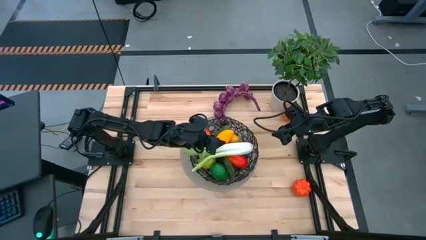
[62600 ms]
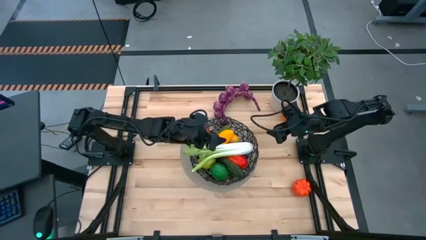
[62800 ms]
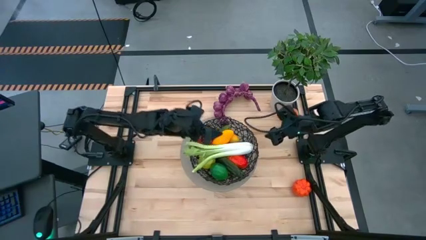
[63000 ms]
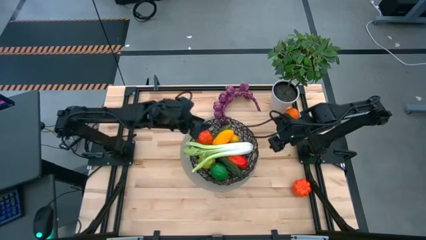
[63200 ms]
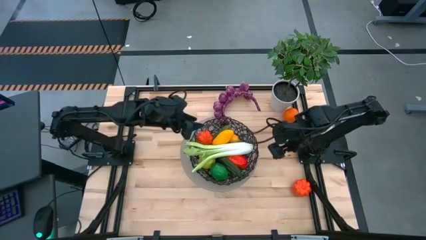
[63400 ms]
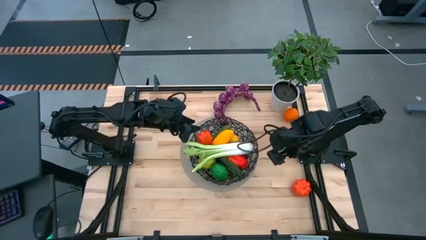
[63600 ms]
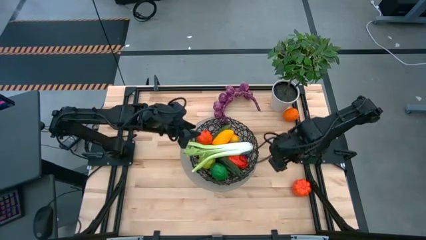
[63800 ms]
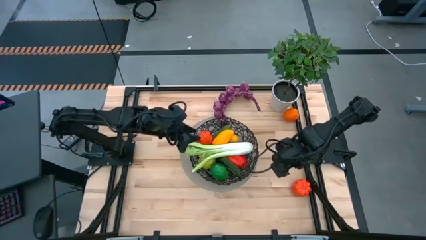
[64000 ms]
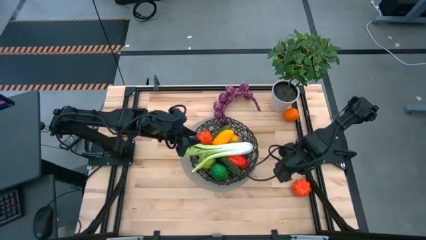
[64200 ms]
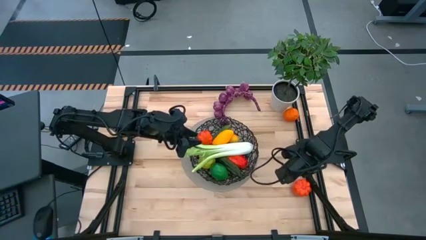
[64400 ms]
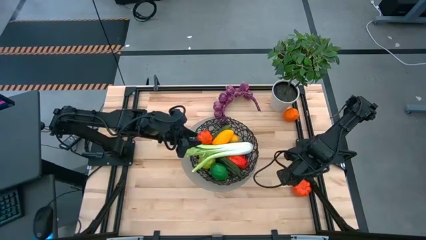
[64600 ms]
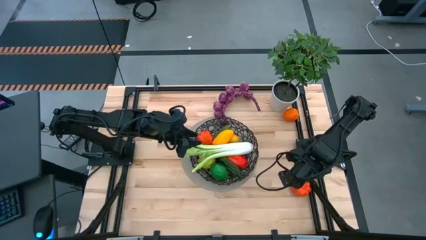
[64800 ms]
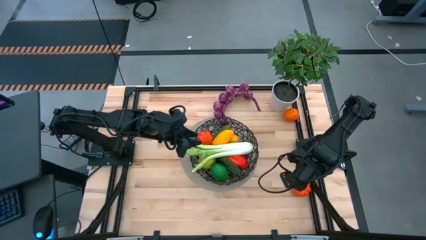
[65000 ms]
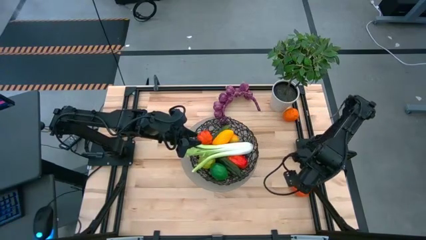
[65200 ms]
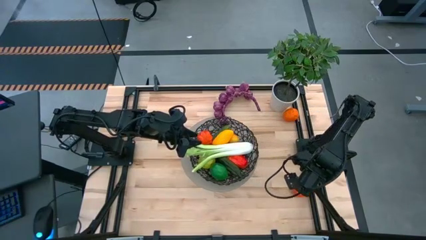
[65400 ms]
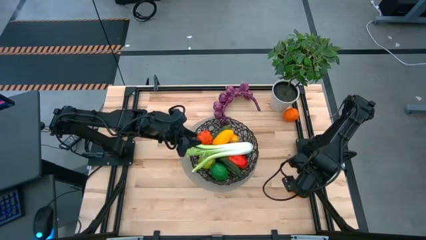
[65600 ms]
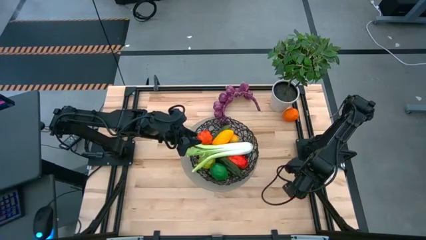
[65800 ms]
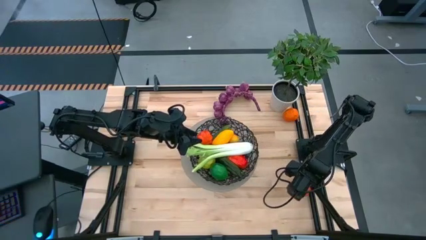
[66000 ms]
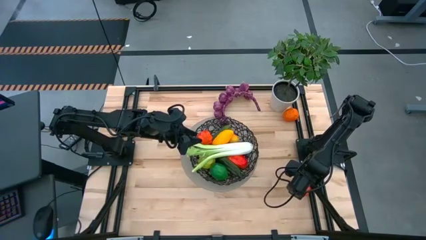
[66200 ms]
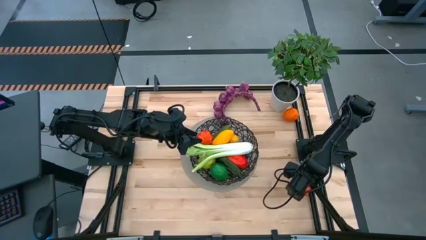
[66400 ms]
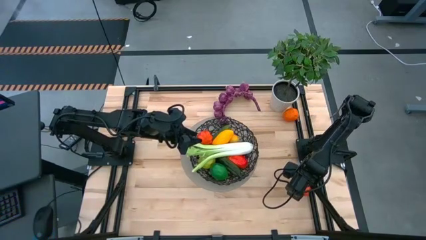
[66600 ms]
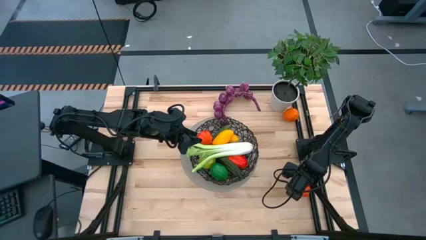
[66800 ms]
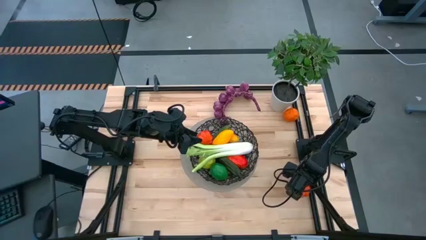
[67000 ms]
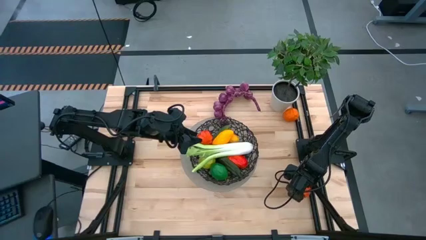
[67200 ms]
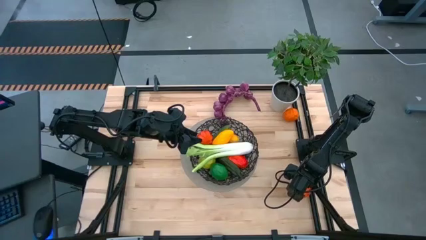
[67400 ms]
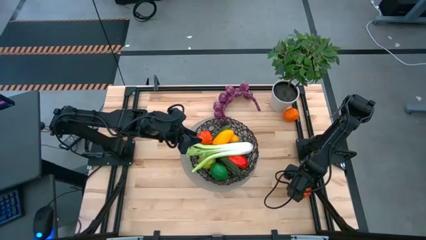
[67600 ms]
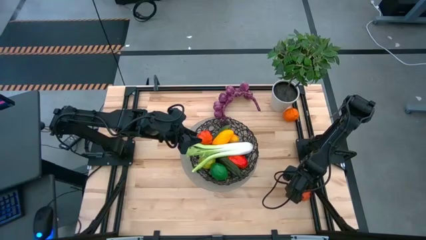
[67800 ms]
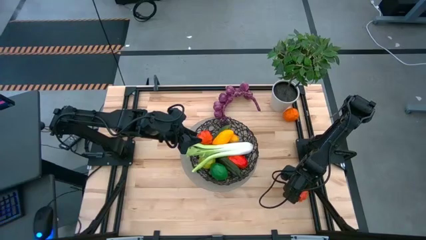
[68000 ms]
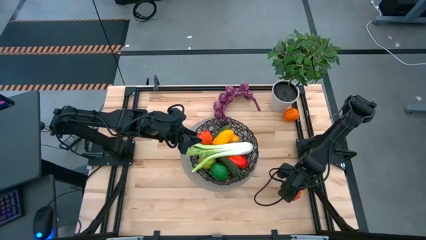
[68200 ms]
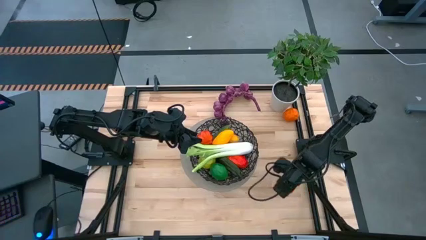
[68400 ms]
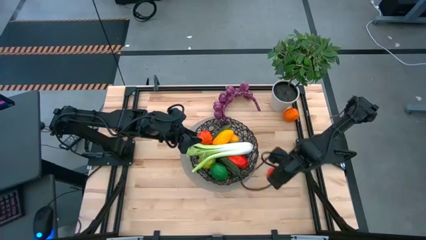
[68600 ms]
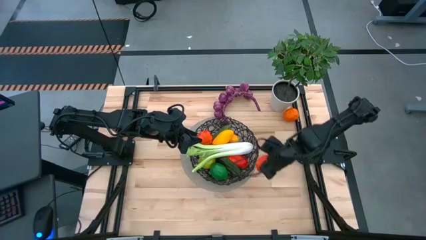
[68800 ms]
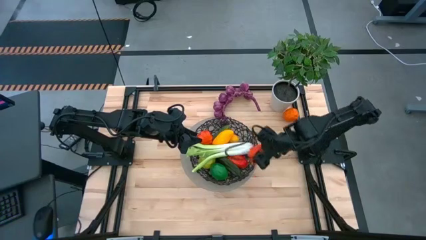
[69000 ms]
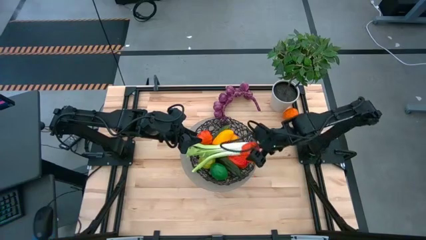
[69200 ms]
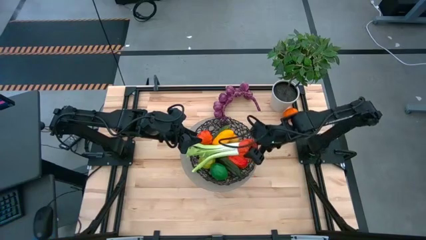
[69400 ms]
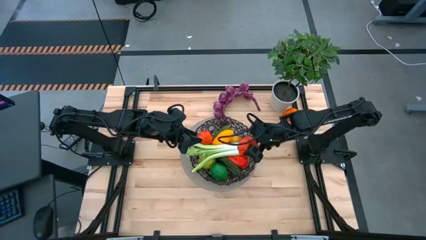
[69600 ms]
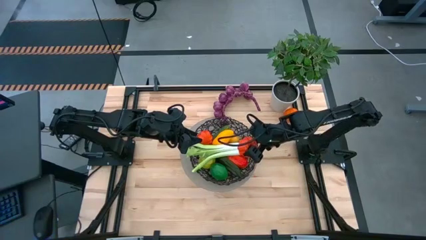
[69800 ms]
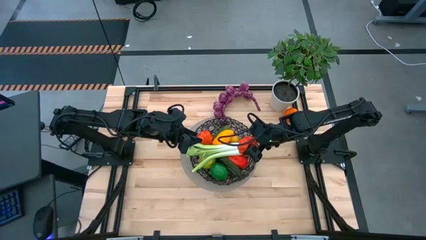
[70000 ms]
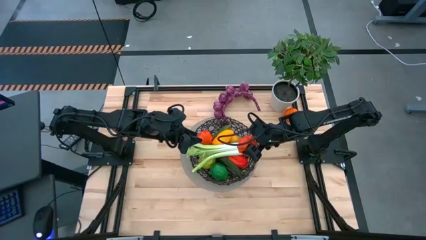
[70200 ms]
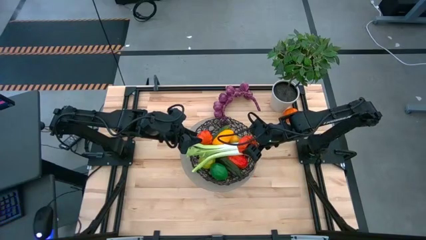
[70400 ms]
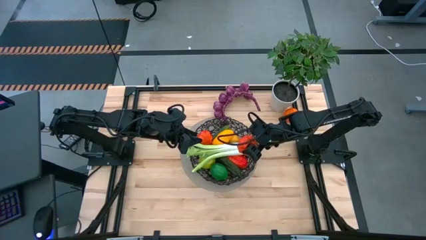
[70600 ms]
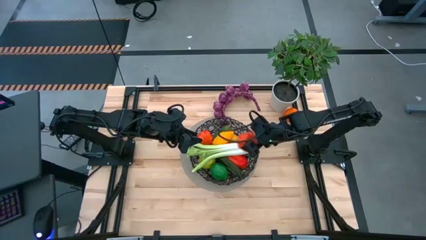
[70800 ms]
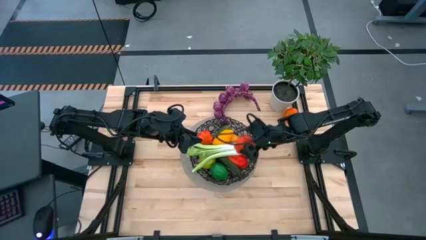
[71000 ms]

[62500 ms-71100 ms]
Task: Build produce basket
Put the orange squash into the black wire basket

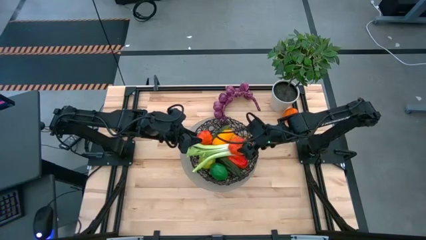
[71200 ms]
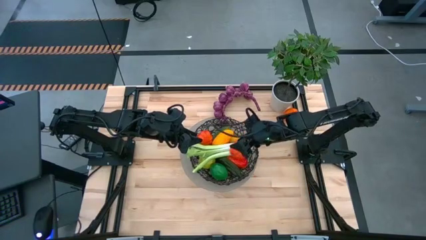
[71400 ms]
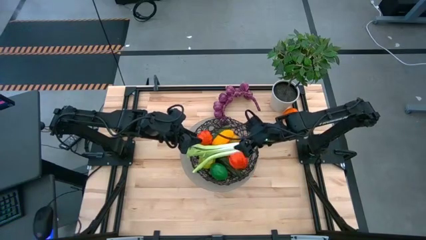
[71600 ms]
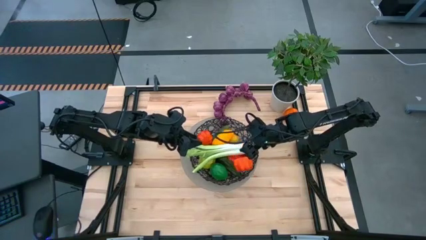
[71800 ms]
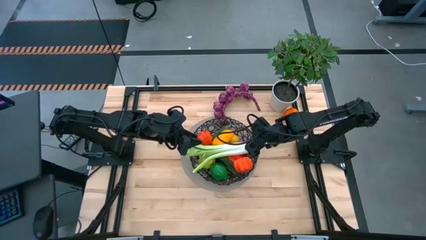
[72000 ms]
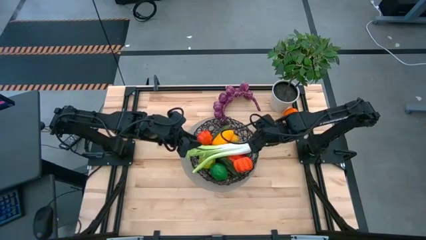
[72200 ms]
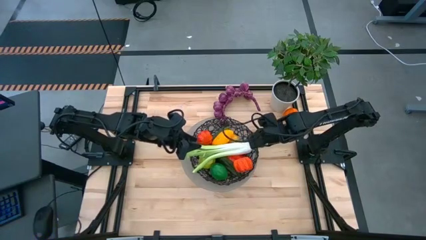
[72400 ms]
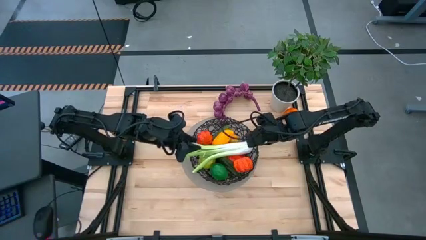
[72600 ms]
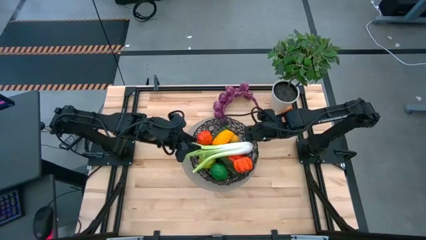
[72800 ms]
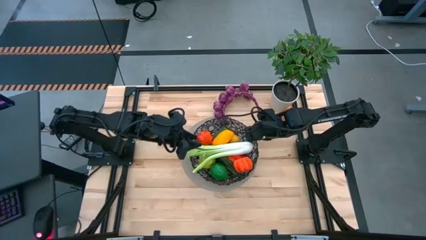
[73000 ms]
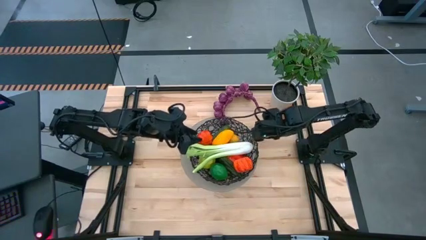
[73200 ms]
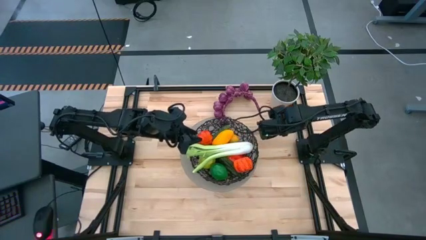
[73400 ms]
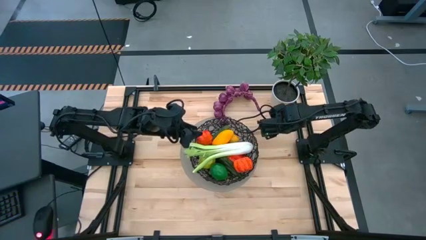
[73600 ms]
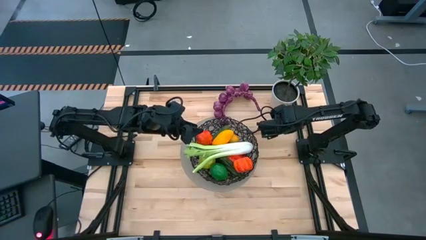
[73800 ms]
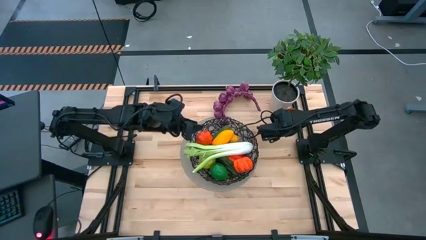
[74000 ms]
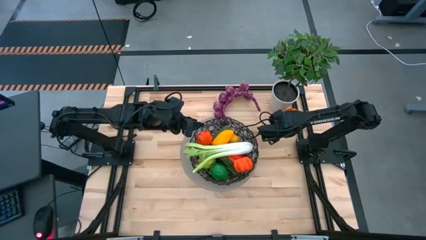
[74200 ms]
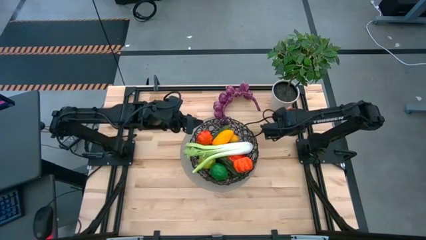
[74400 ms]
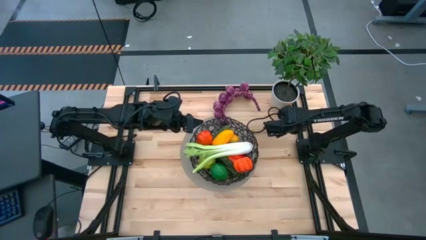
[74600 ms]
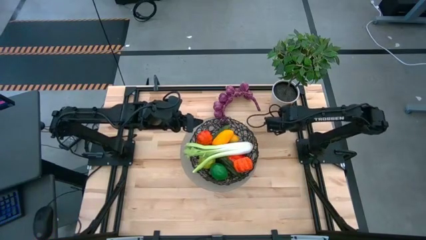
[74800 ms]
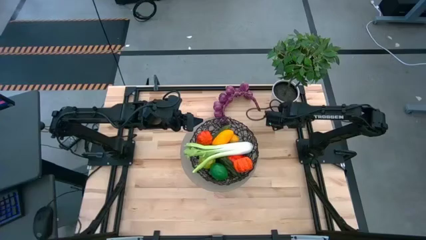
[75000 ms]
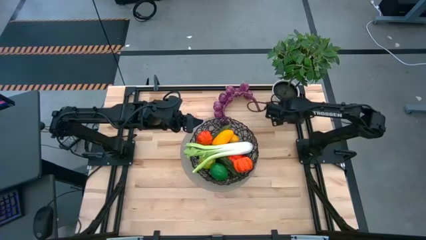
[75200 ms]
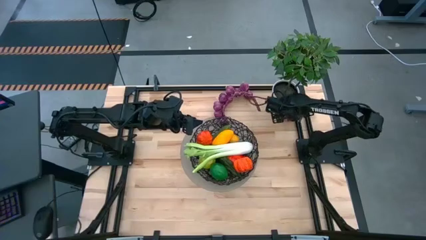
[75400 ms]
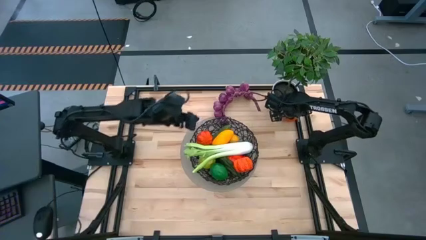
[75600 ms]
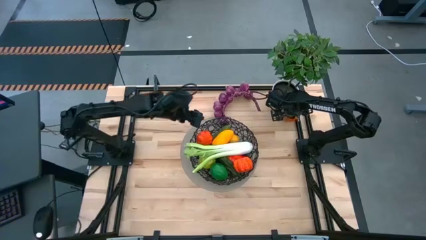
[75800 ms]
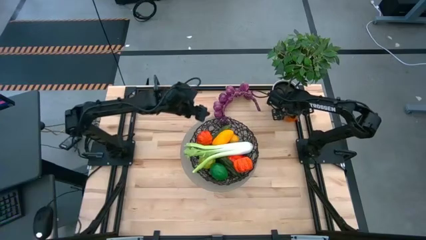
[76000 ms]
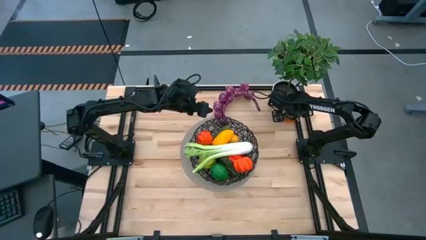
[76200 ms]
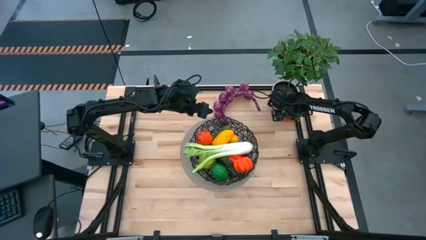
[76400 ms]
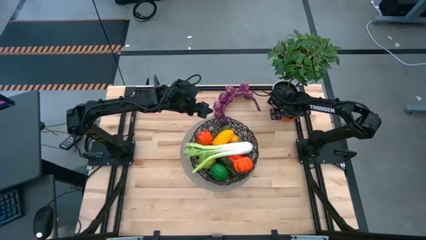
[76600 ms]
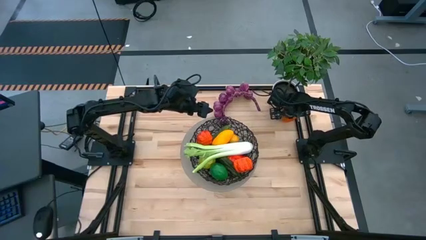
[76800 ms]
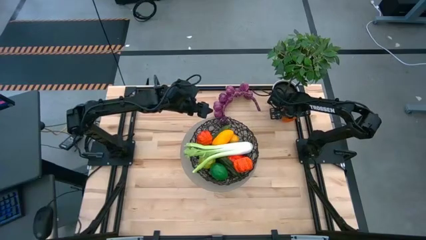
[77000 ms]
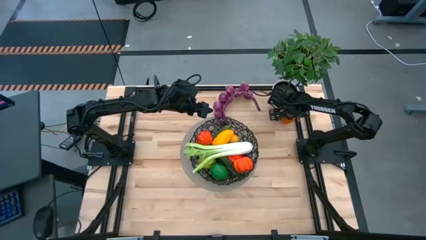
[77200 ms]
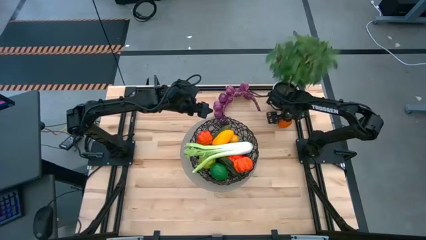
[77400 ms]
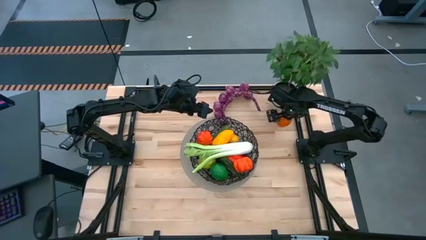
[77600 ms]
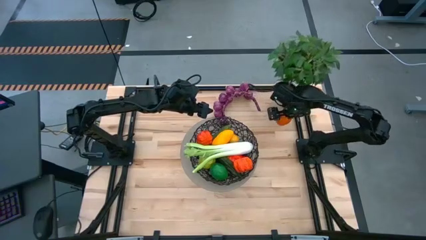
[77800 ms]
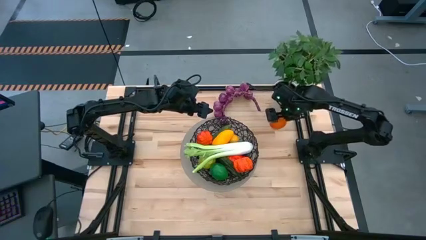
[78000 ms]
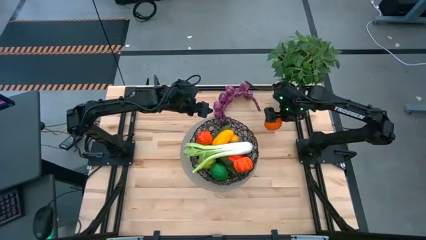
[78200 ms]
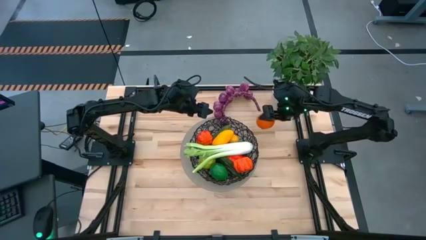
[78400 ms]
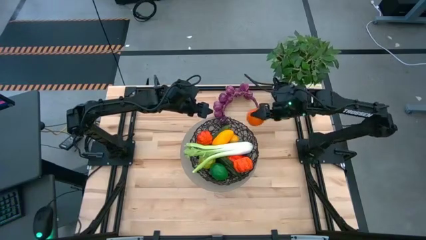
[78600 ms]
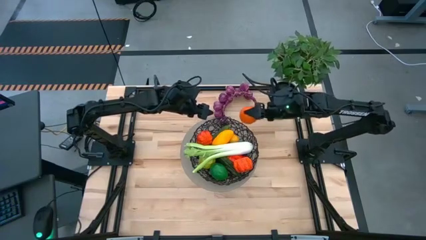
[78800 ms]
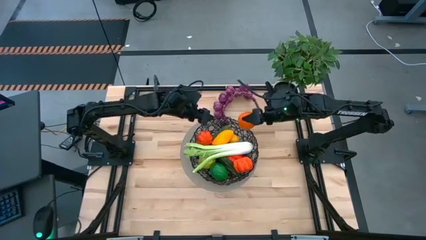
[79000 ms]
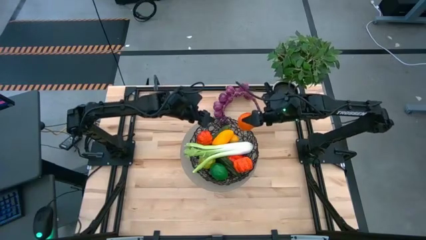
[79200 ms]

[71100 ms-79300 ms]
Put the orange into the black wire basket
